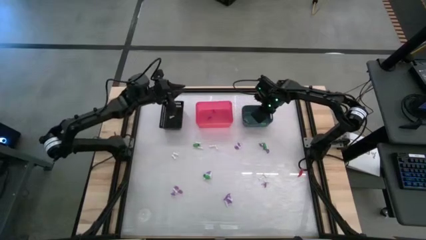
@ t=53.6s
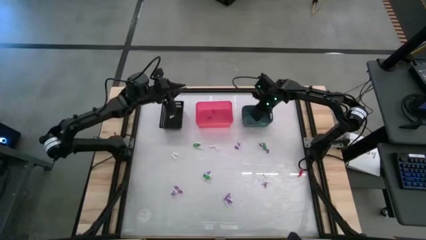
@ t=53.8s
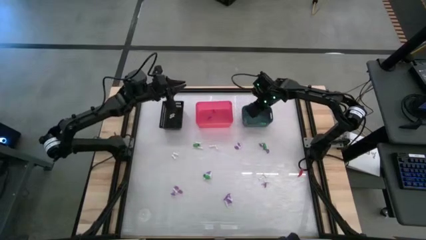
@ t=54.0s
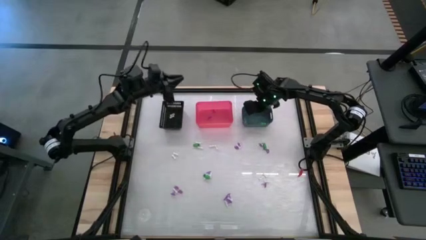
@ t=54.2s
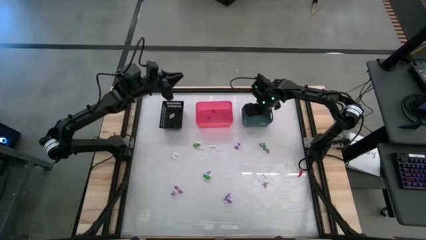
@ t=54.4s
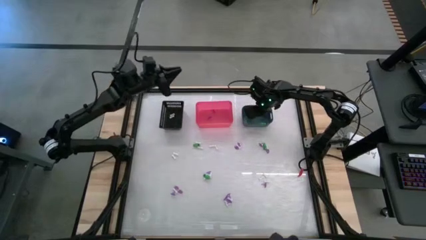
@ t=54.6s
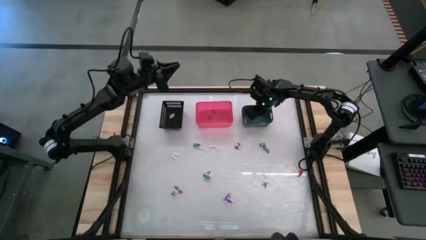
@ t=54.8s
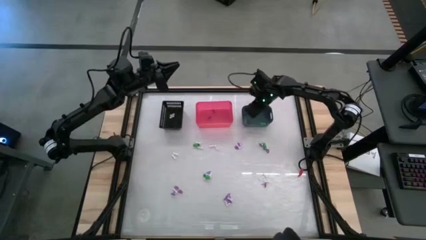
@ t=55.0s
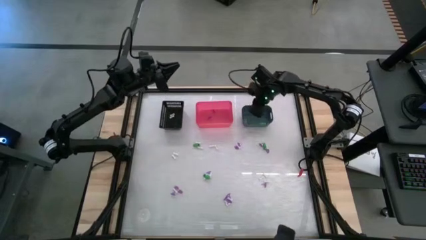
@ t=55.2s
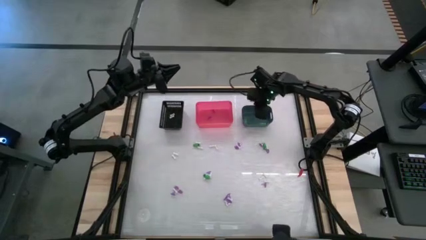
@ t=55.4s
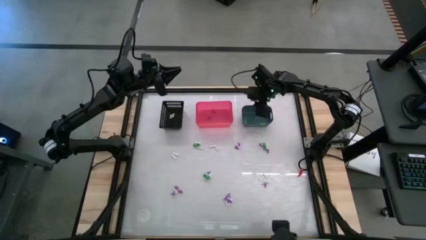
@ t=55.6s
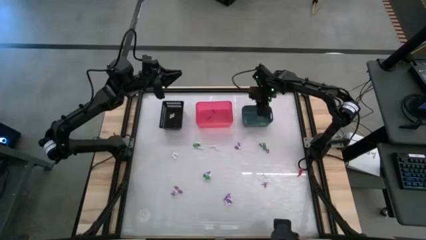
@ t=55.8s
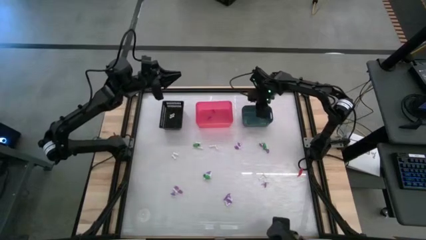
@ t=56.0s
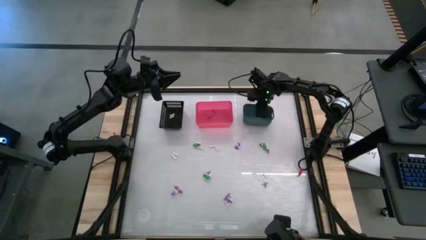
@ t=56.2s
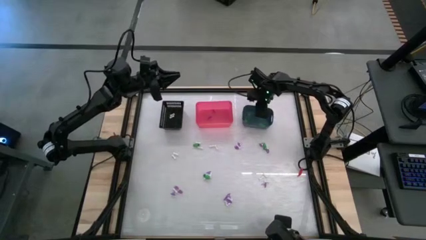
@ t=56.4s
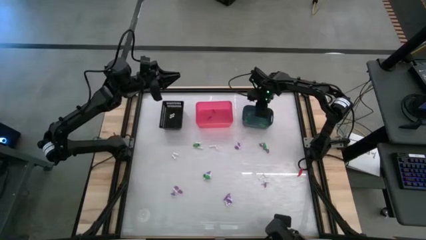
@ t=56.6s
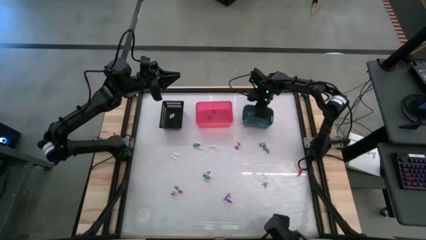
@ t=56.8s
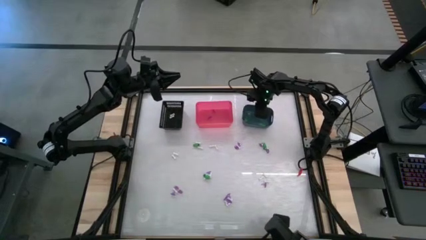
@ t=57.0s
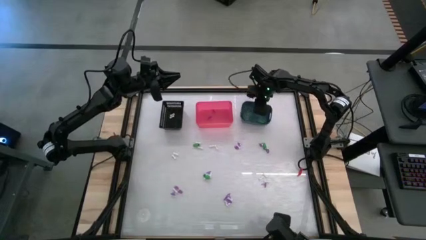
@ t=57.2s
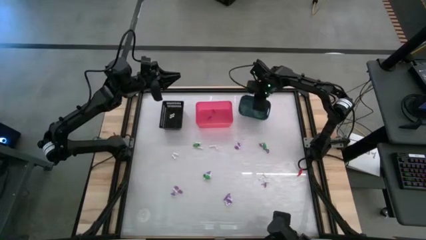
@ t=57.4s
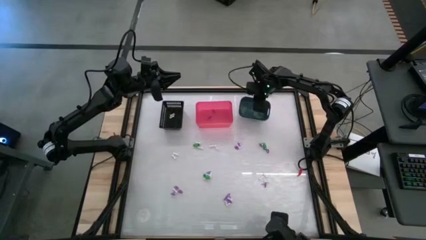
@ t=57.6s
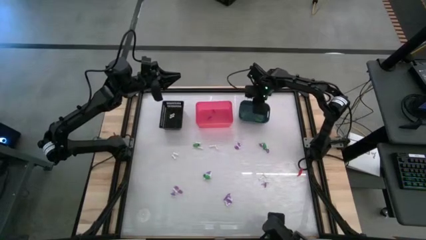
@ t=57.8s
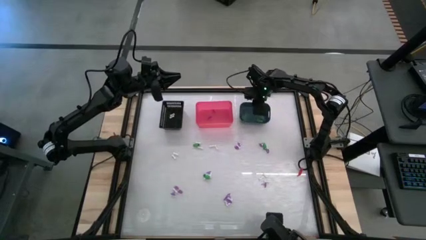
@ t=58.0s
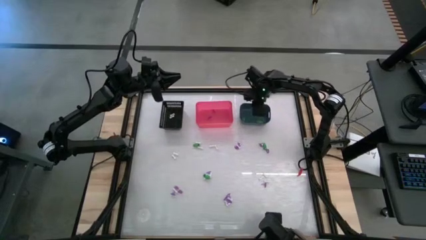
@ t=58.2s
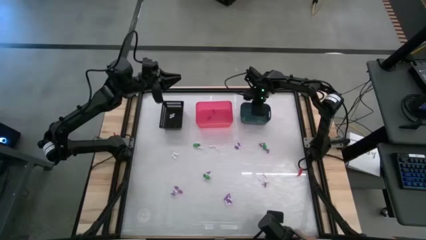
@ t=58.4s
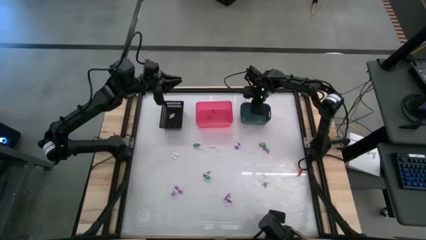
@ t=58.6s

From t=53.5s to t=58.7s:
Task: Sort Halloween decoration
Adjust the blue bin

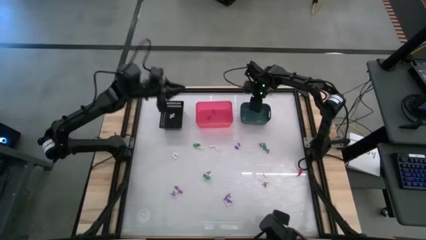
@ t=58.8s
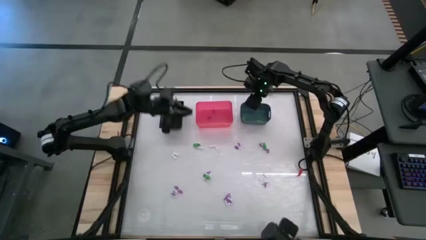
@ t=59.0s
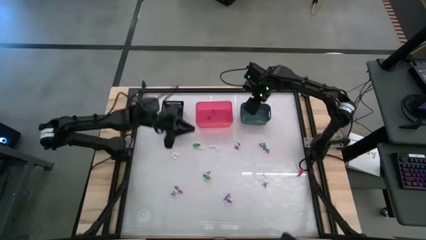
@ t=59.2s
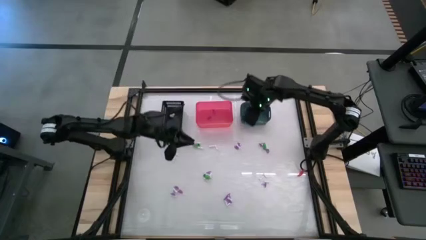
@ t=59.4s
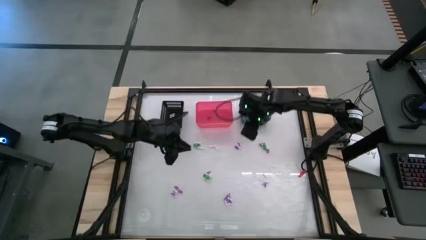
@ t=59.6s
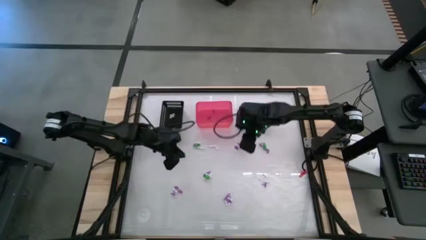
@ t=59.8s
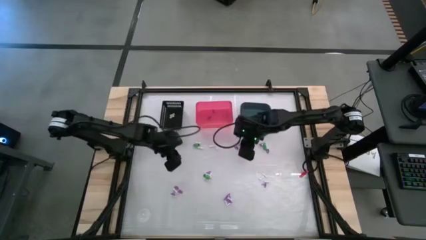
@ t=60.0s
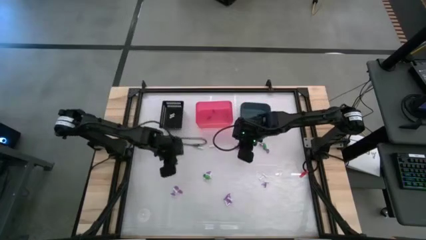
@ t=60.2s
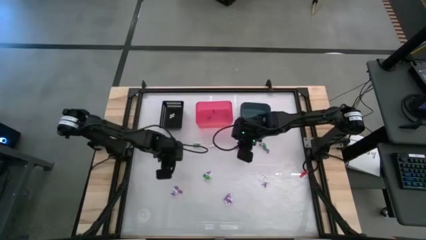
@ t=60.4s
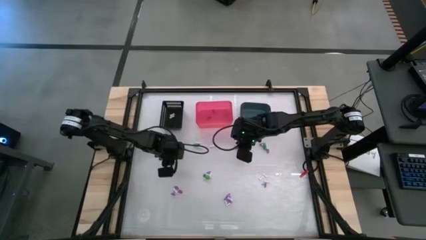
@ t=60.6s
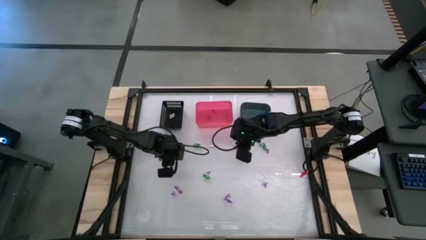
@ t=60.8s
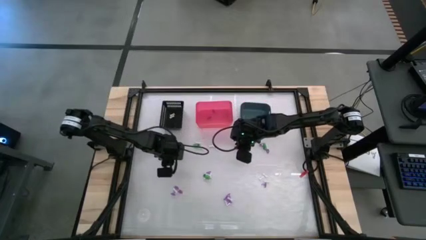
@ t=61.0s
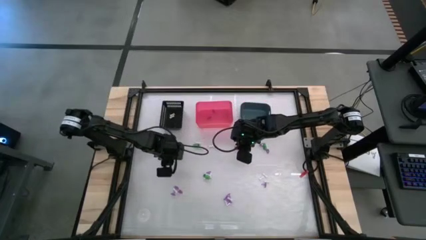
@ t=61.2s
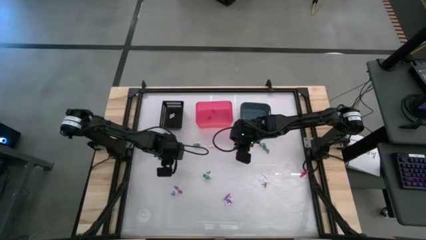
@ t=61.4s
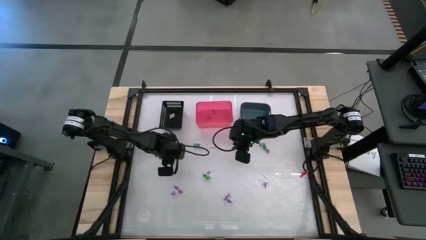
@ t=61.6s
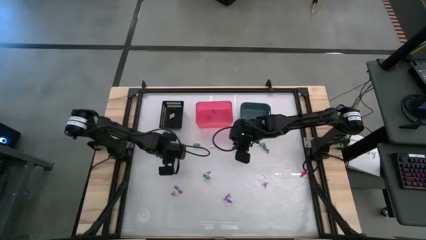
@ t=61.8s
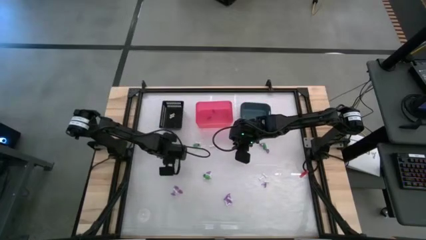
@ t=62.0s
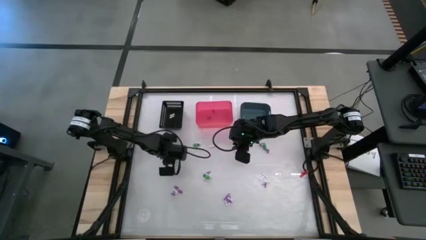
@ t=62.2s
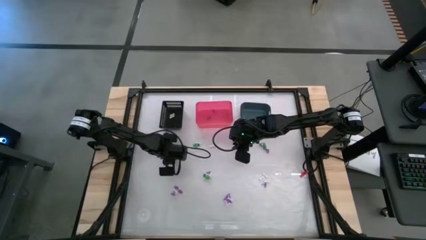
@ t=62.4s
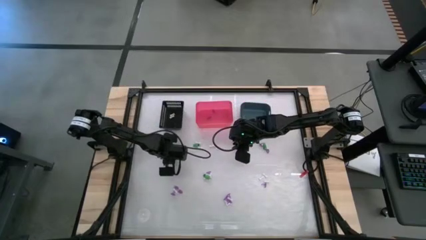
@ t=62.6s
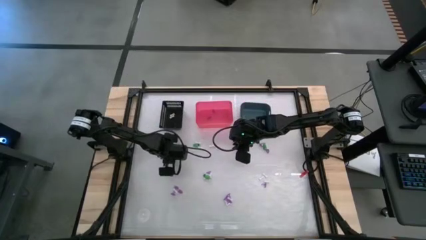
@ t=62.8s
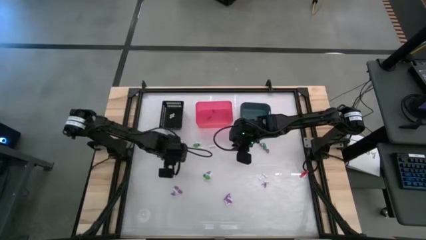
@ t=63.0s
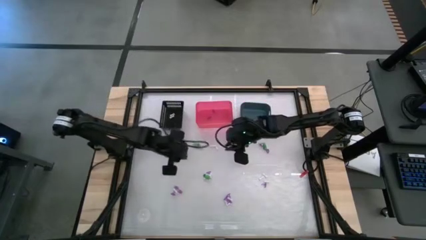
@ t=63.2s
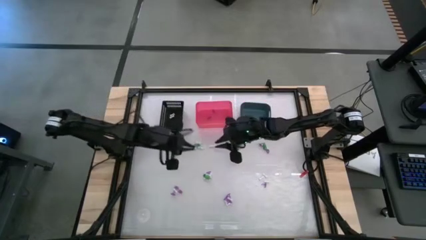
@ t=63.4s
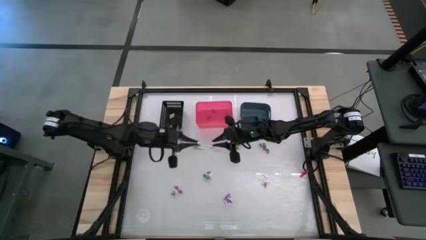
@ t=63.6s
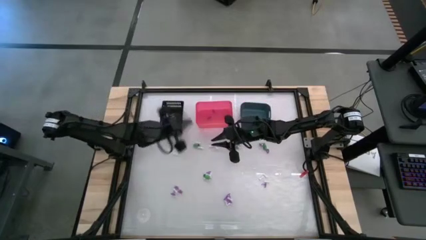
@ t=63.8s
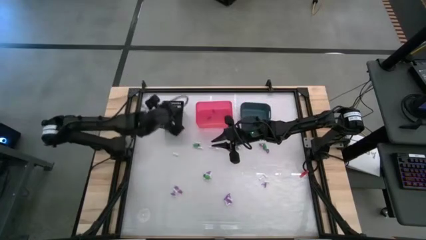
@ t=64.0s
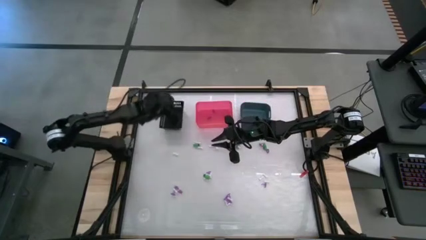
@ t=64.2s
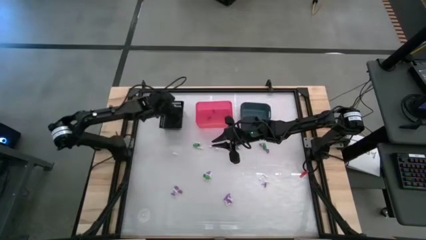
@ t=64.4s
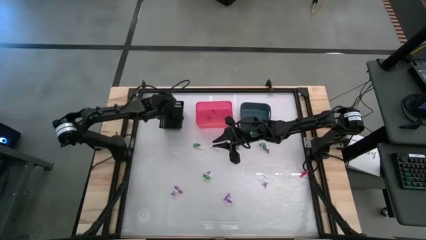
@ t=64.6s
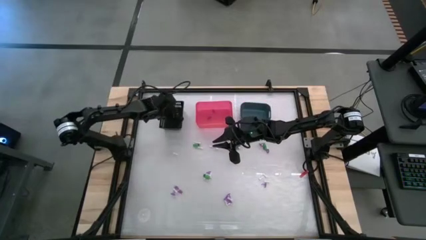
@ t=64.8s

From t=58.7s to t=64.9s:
Put the white bone toy into the black bin

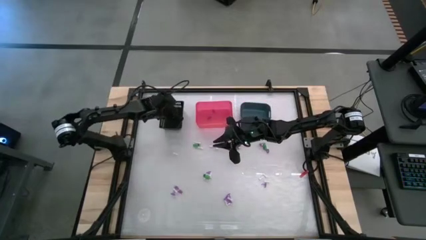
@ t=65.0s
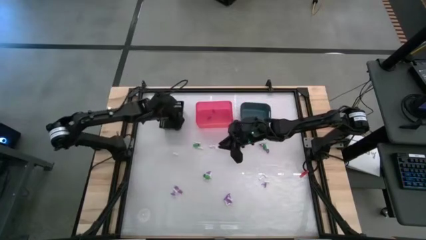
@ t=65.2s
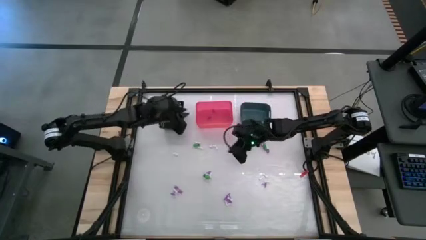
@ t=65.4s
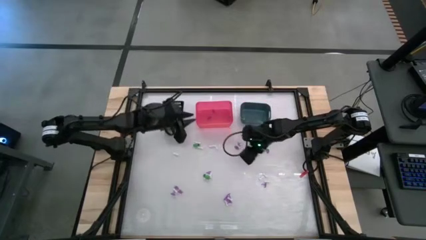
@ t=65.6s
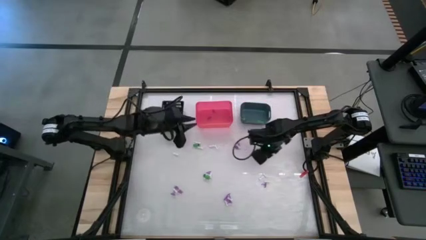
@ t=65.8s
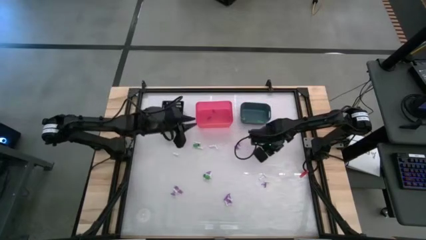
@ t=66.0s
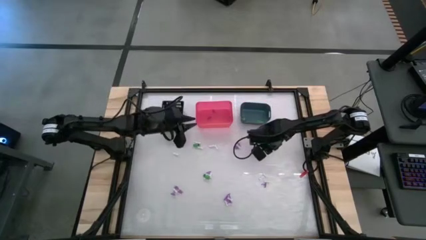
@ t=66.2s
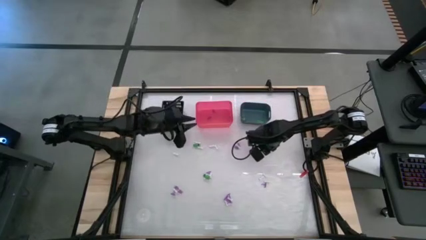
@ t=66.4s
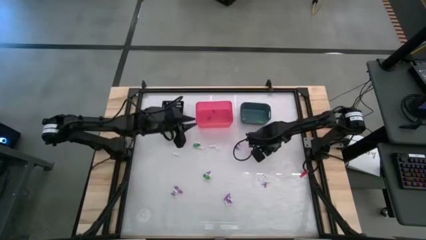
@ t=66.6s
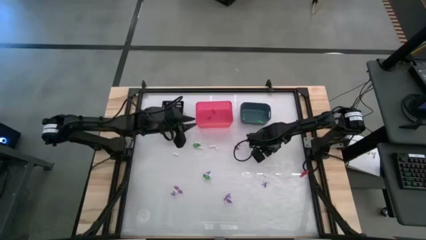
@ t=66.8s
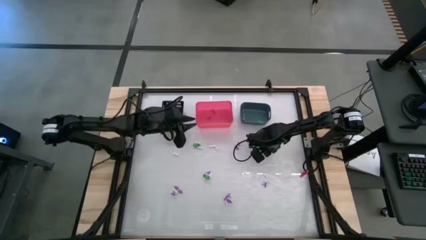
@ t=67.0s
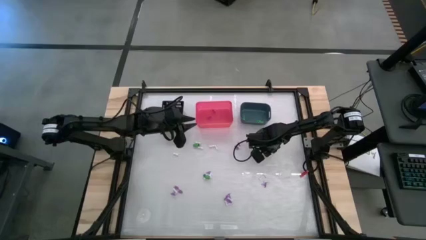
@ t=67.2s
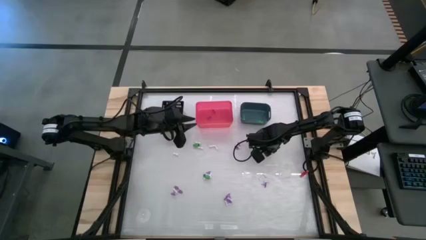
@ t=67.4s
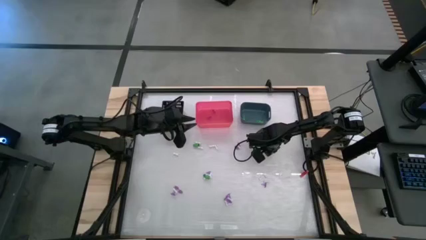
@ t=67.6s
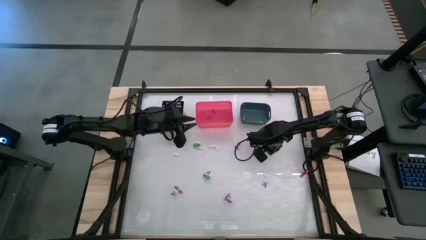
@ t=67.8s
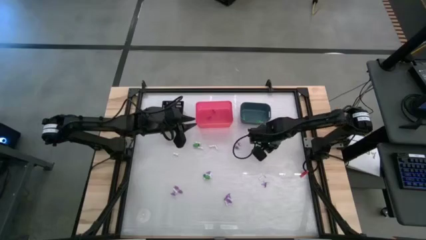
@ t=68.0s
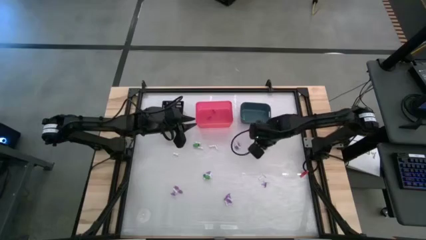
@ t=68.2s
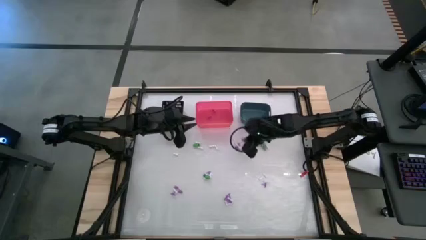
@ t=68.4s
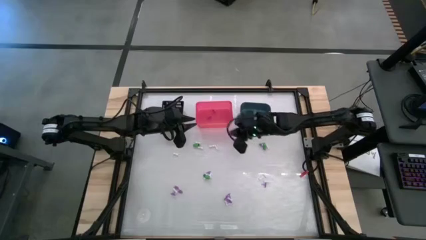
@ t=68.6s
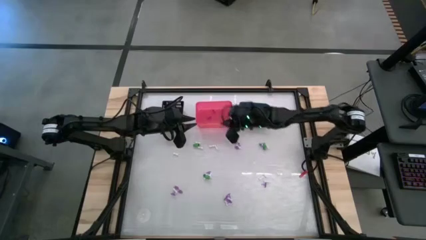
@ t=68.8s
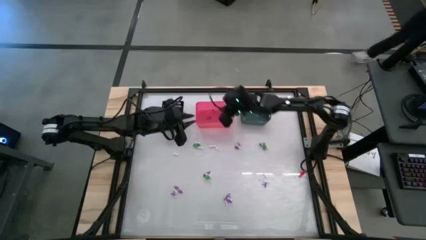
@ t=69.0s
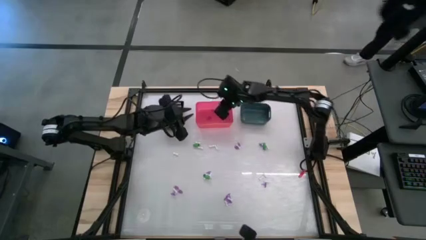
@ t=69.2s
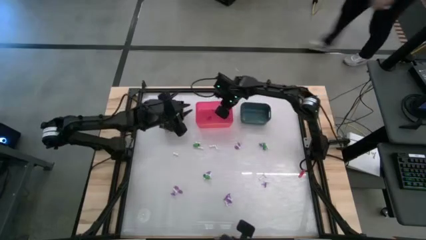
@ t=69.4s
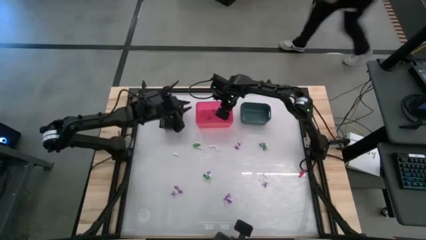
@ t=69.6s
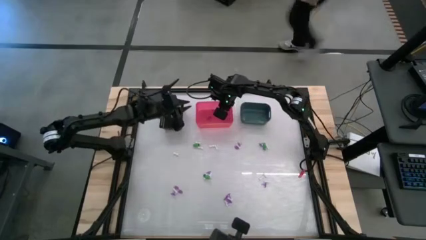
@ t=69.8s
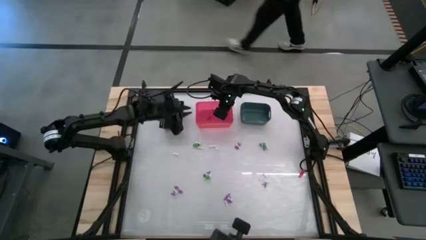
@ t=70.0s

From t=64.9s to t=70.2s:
Put the purple hat toy into the pink bin
